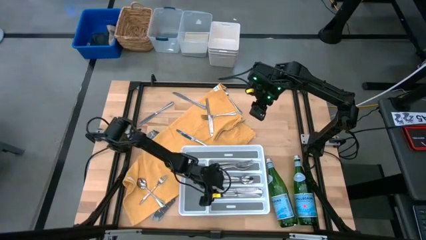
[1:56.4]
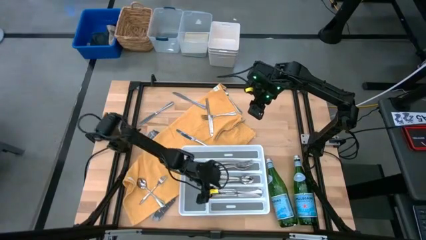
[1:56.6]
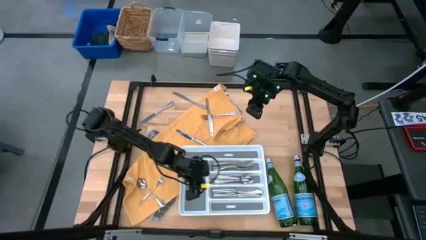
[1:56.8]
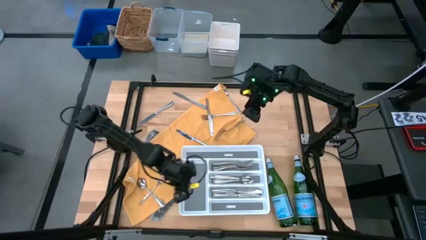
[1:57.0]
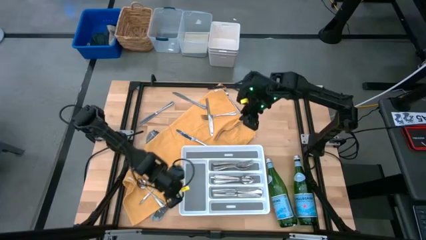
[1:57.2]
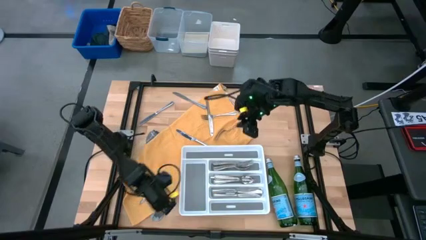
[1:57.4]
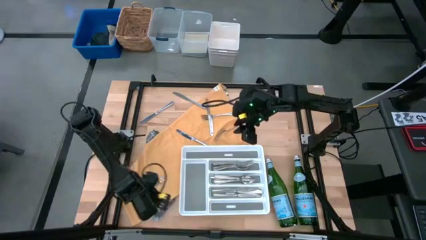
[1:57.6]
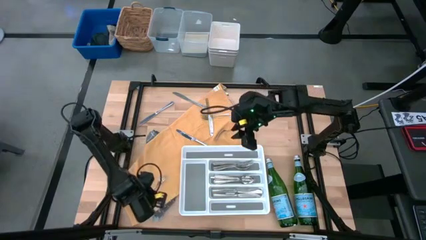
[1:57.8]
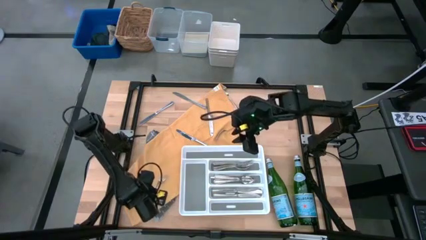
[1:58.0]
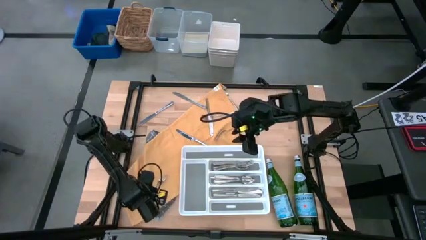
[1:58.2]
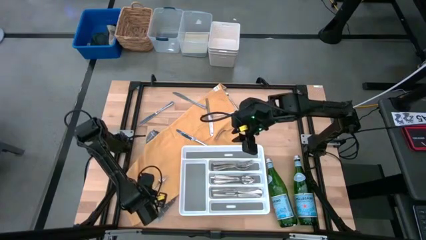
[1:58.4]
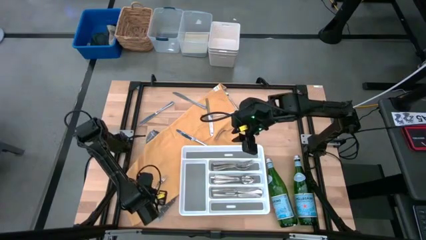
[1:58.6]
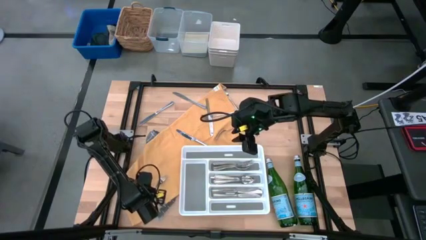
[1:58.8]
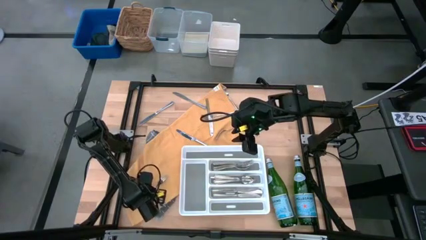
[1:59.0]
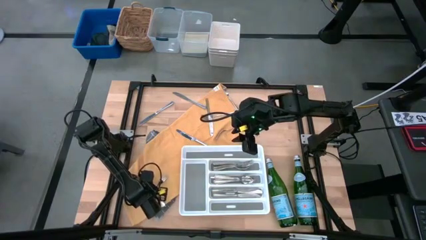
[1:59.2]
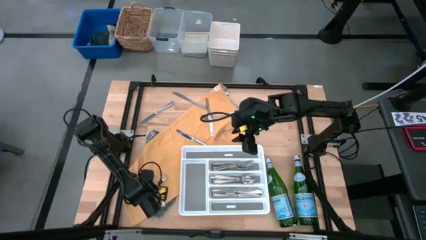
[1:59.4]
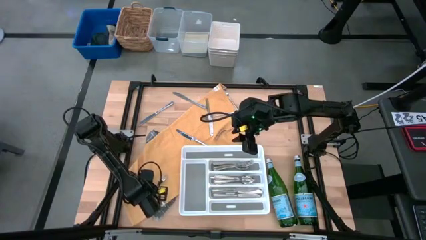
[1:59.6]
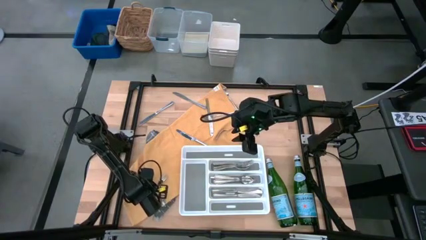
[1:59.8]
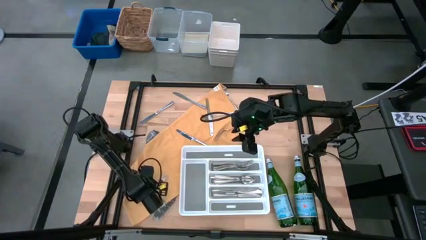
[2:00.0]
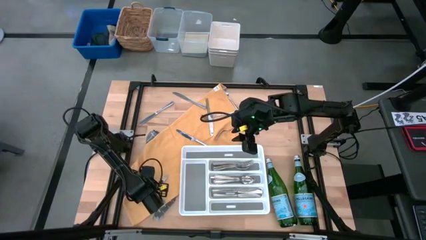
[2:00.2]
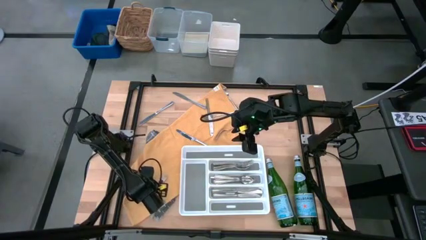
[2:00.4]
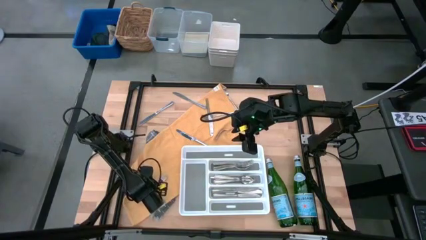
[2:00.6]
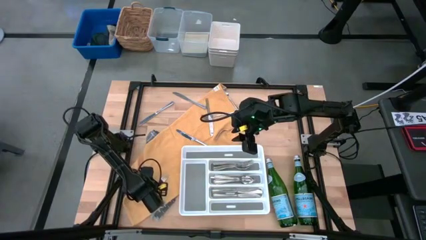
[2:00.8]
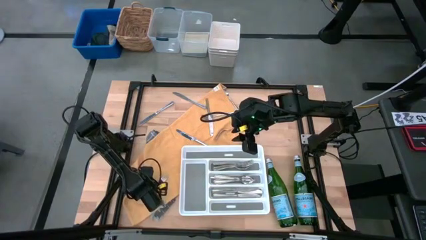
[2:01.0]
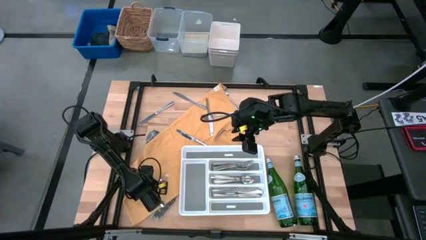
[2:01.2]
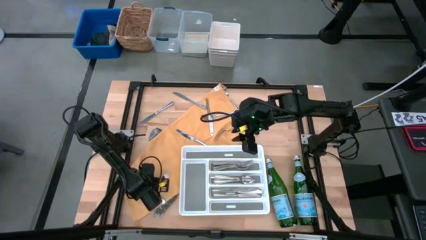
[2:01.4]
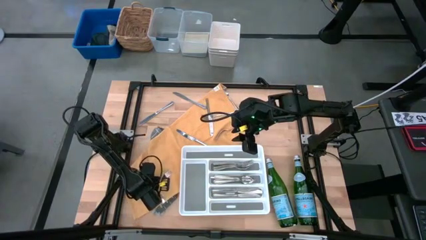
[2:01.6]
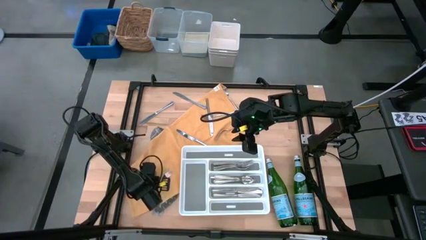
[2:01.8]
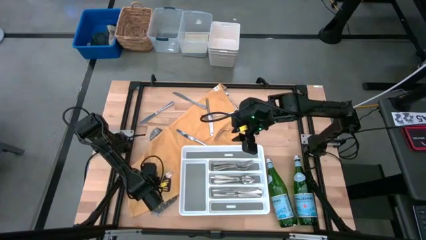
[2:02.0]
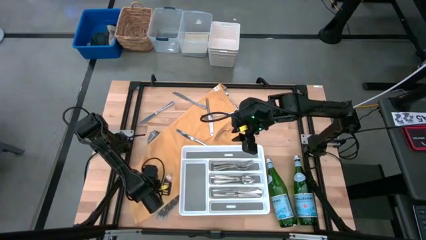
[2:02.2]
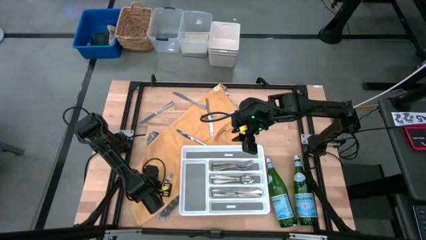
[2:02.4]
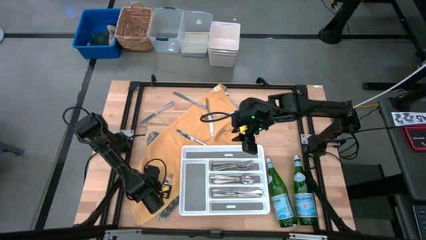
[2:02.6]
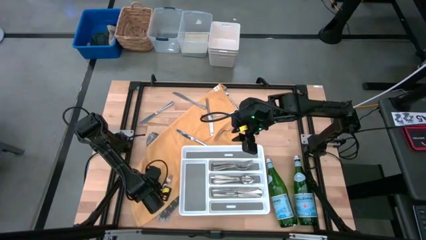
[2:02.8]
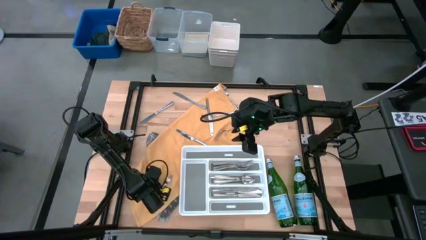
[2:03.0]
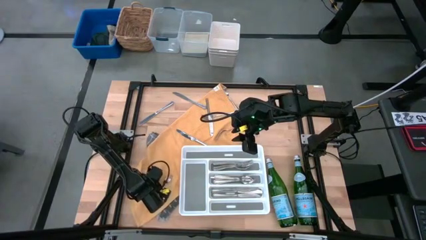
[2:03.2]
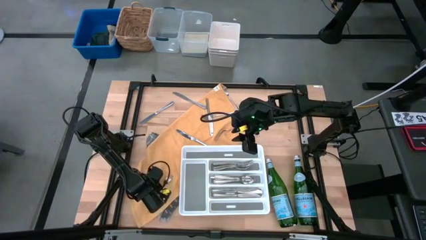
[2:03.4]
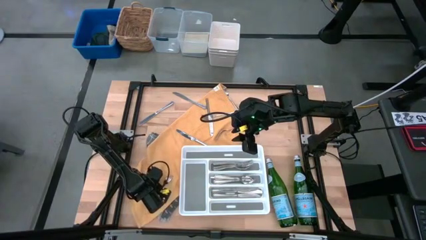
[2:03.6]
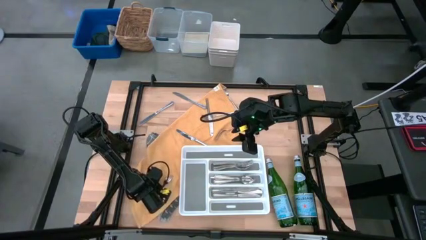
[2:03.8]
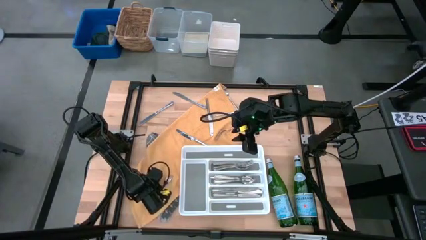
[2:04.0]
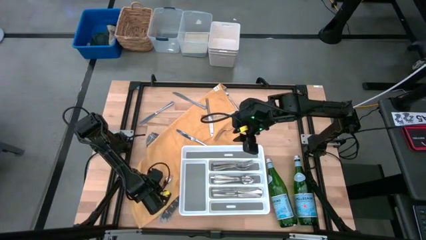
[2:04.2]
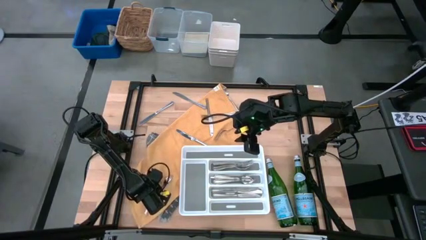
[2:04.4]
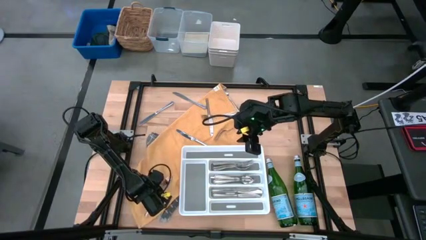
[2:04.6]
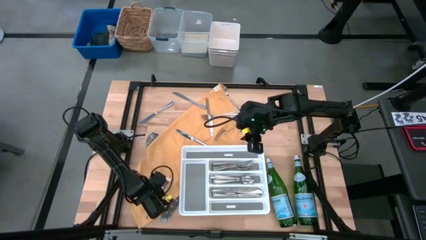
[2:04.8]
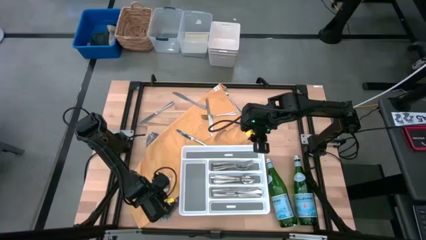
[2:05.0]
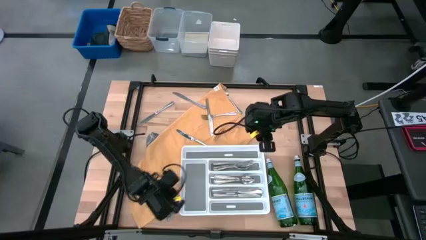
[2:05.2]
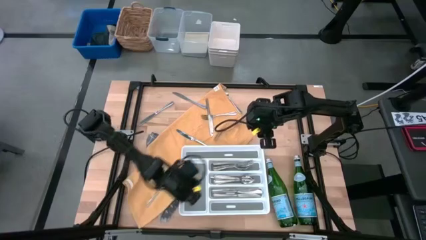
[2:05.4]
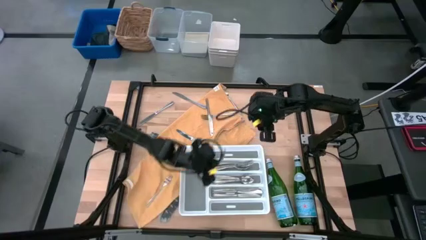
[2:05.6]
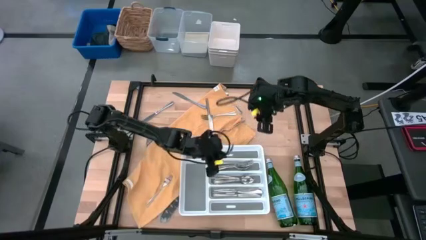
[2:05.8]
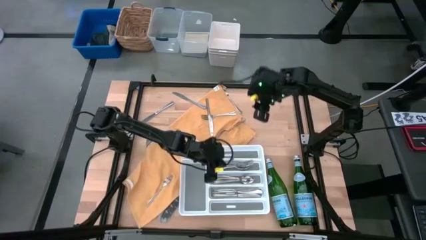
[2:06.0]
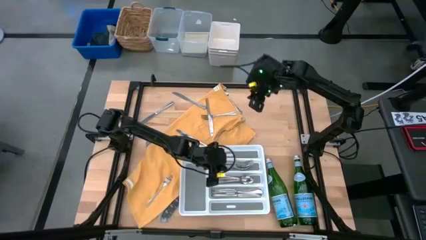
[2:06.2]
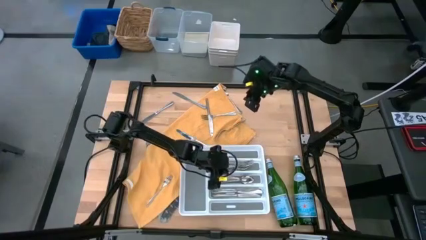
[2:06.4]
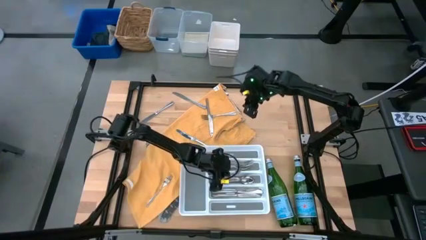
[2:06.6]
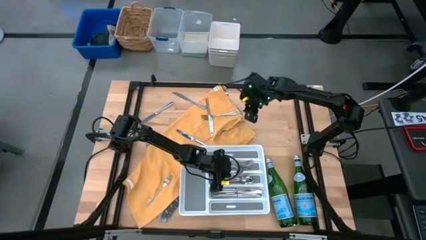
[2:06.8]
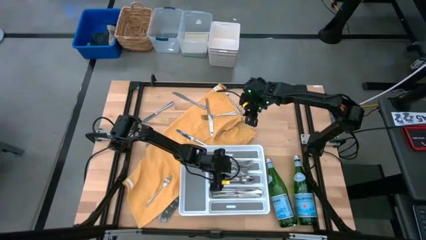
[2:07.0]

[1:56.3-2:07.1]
Task: Sort silverware
Put the silver spoon into the white silverware tray

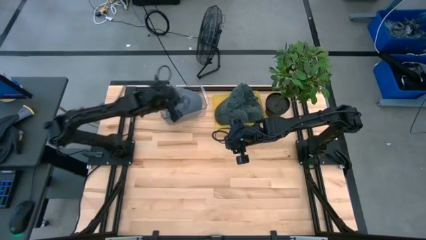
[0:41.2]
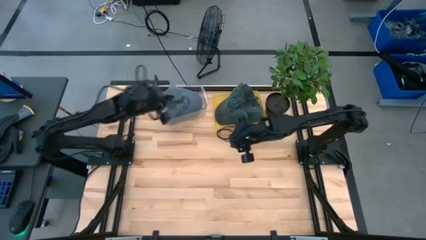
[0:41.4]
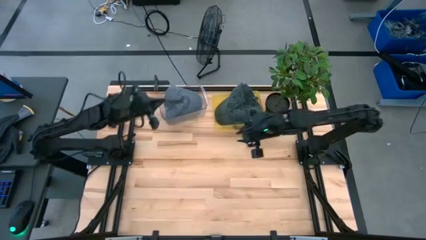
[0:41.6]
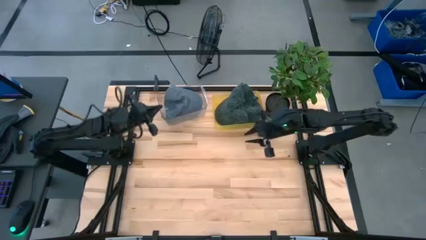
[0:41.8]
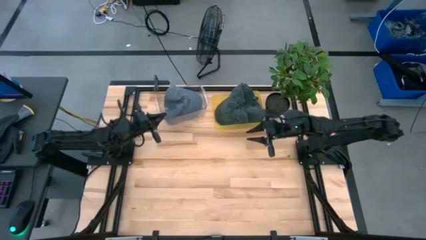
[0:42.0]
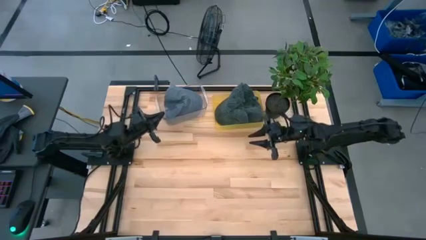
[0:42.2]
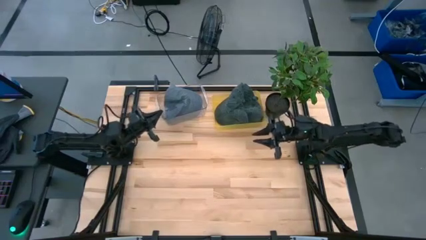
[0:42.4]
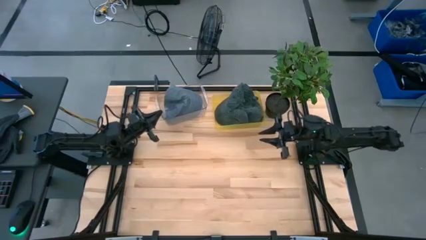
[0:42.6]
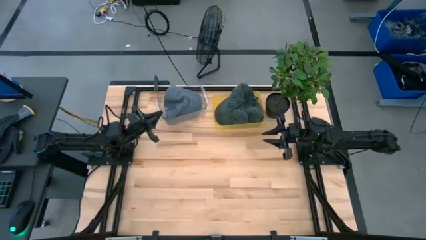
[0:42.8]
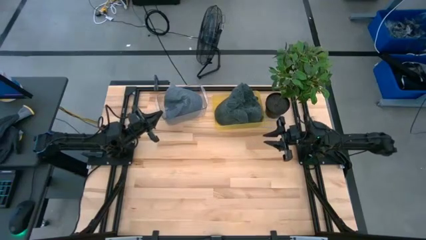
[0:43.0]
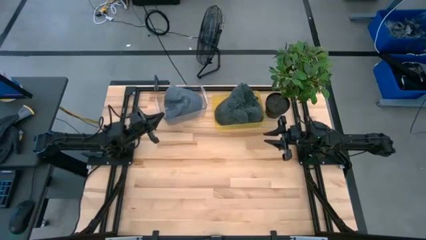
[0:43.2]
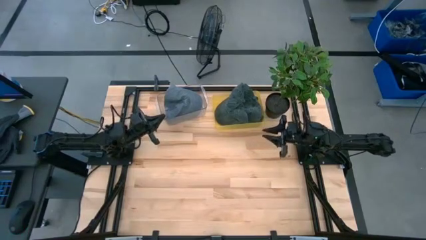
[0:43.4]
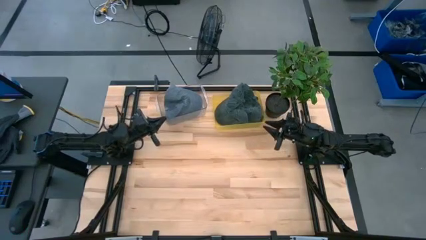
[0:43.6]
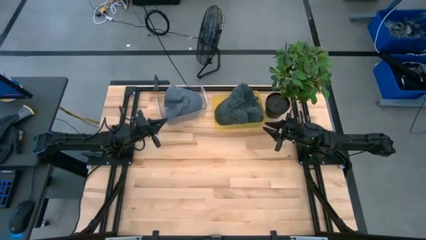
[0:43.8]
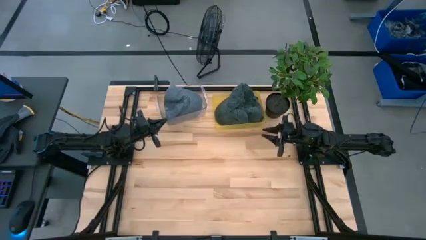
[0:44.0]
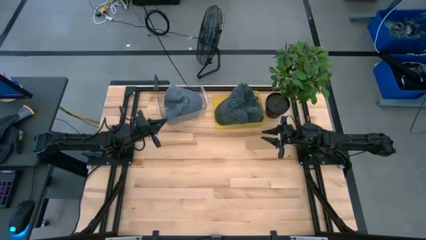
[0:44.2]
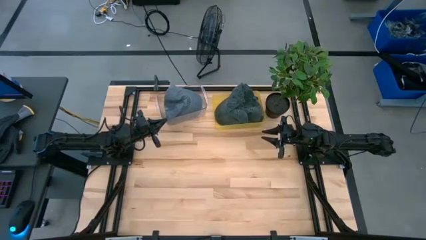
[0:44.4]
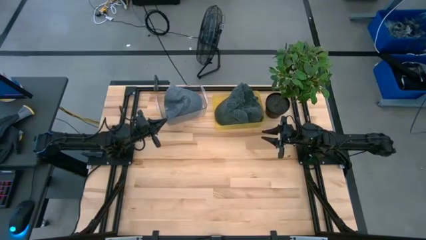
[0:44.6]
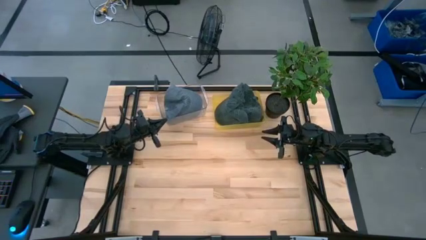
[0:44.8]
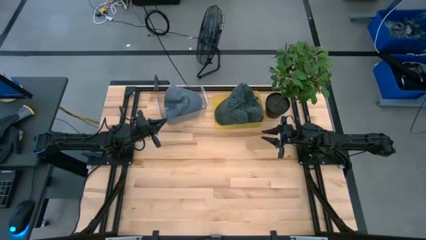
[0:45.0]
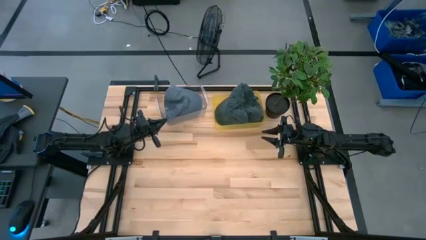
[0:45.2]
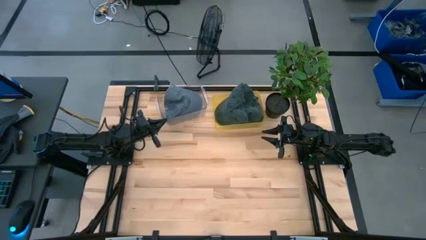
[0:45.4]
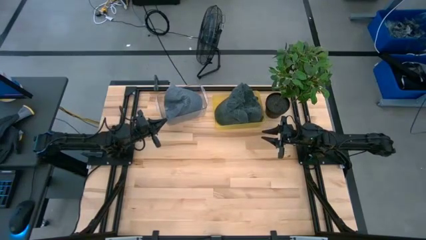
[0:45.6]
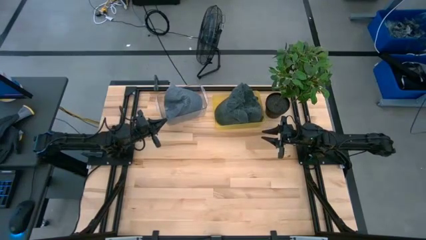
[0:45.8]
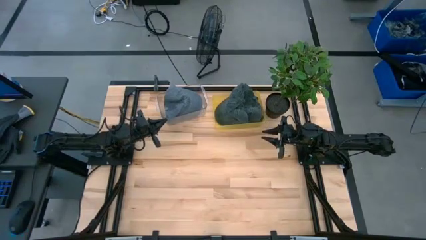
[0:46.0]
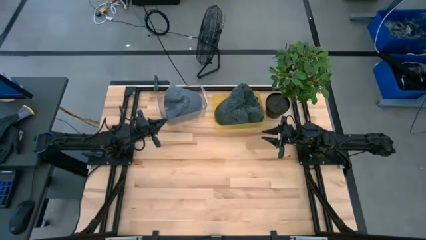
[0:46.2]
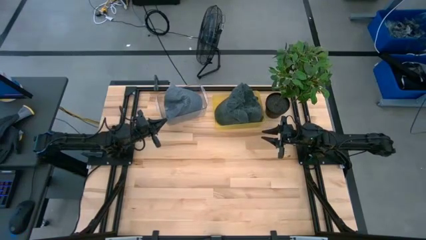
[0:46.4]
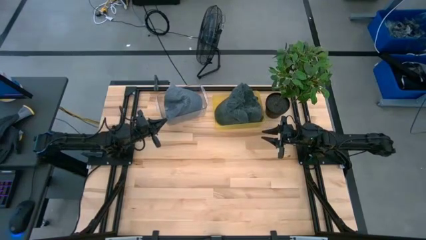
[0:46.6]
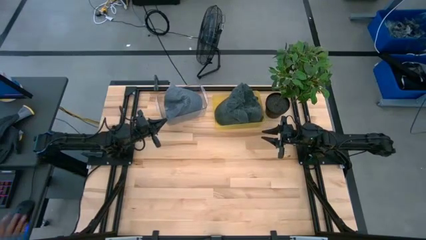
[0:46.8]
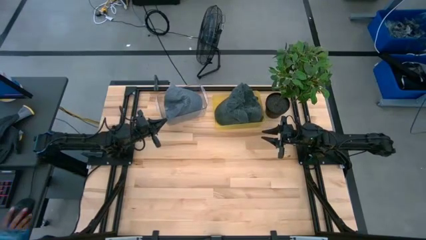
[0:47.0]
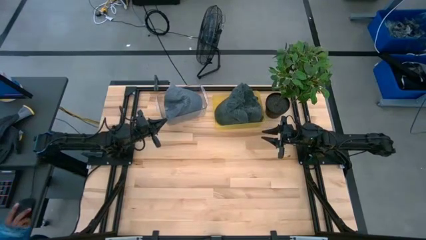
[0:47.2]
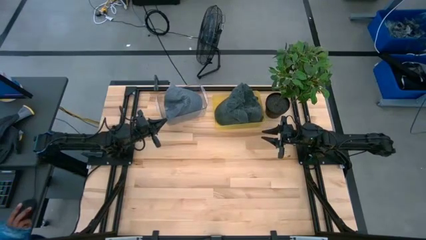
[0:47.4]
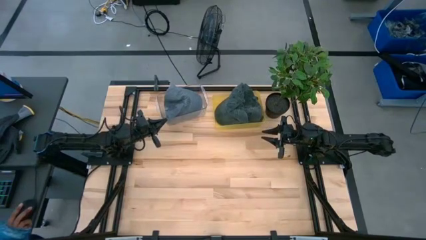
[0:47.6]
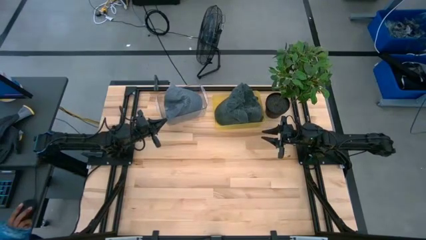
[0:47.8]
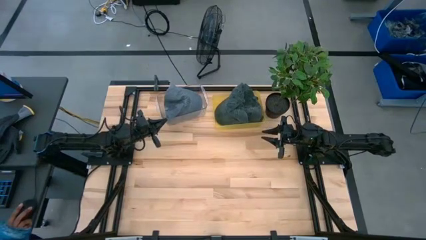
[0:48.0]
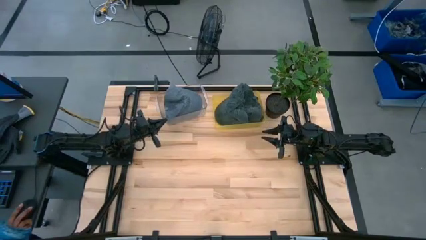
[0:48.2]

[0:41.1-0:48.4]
Task: Pick & Place hat
Return to Home Position
